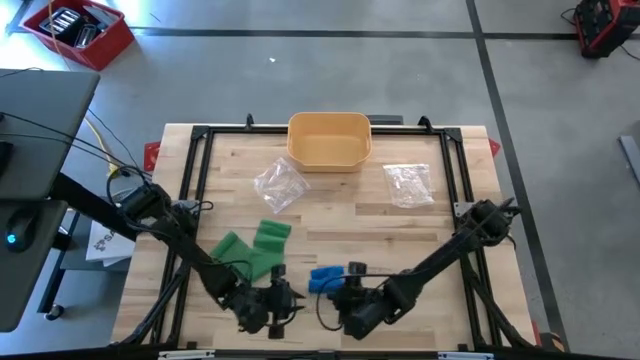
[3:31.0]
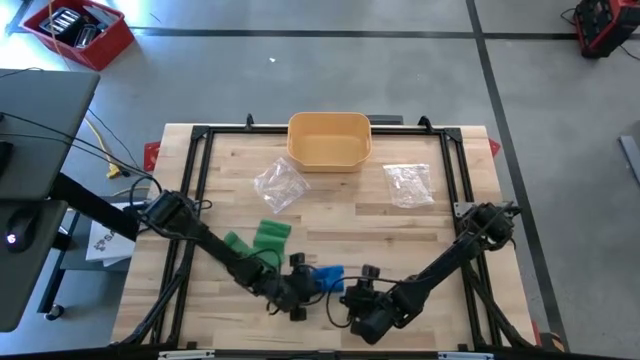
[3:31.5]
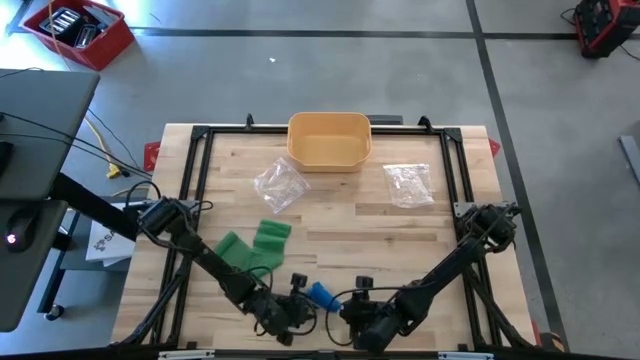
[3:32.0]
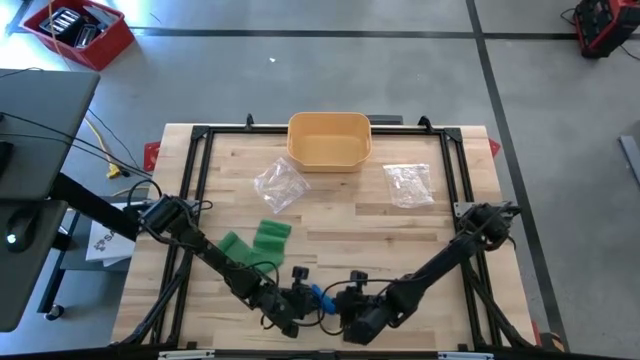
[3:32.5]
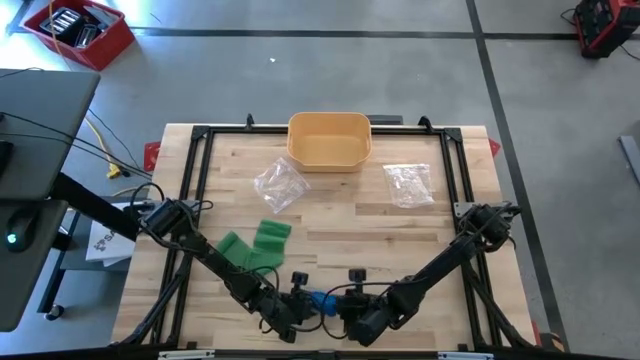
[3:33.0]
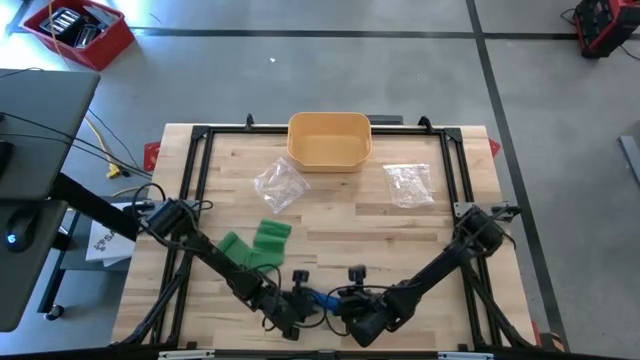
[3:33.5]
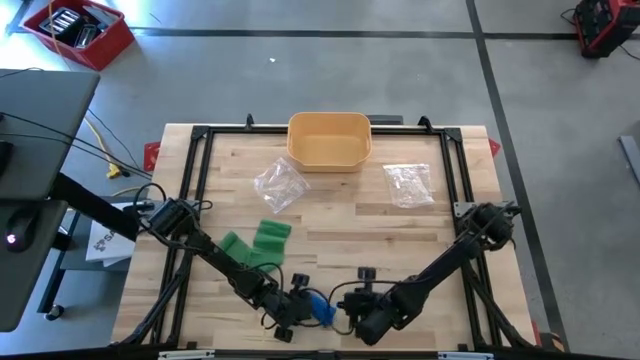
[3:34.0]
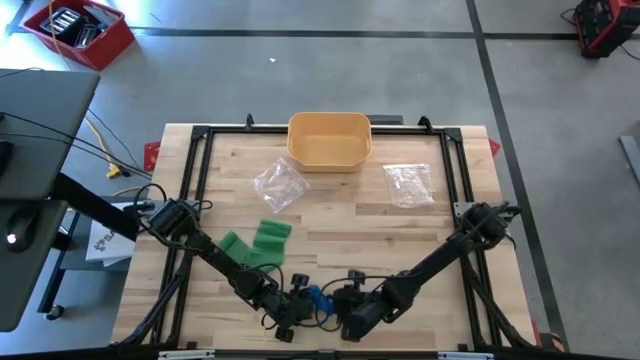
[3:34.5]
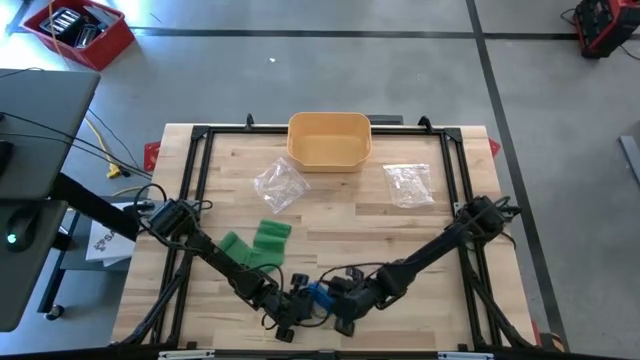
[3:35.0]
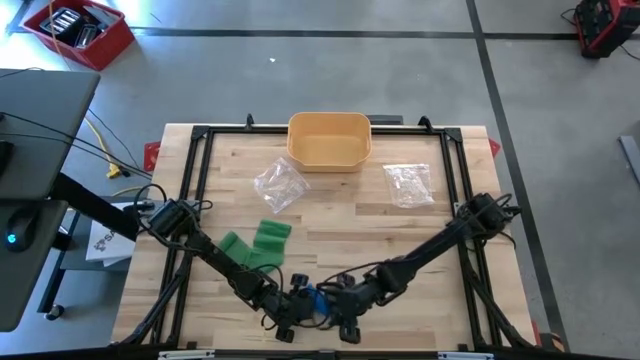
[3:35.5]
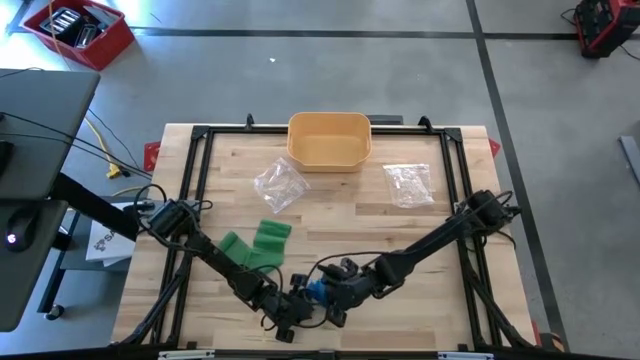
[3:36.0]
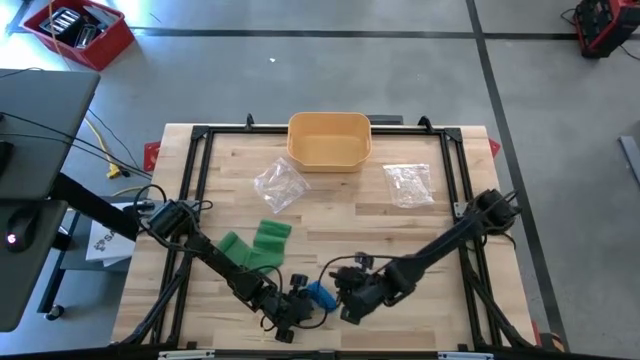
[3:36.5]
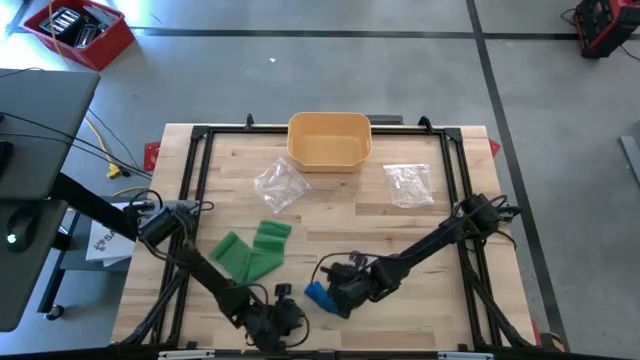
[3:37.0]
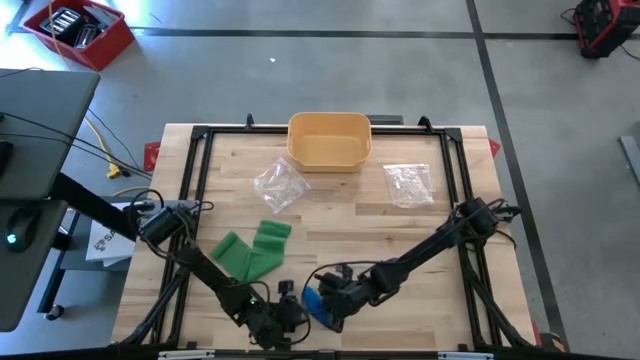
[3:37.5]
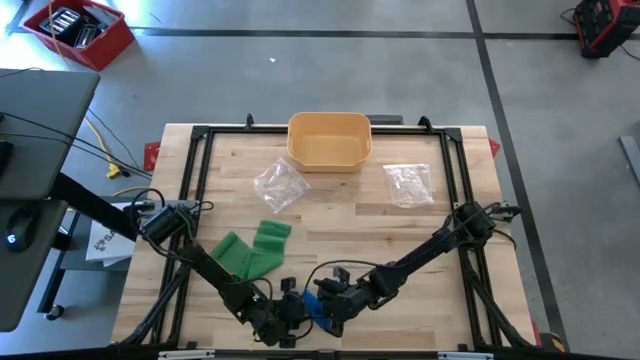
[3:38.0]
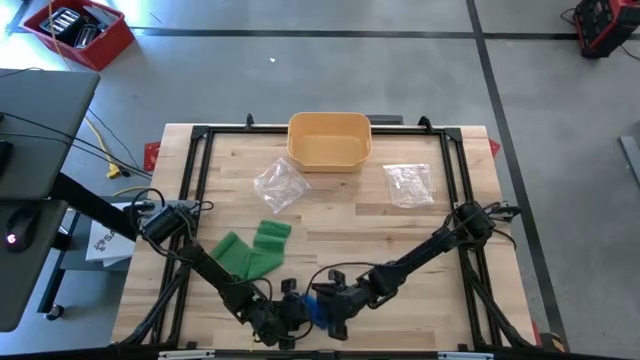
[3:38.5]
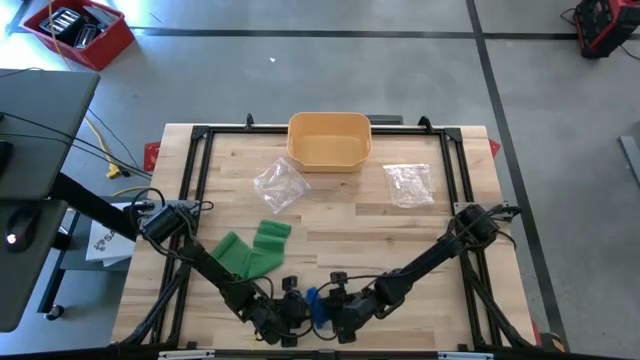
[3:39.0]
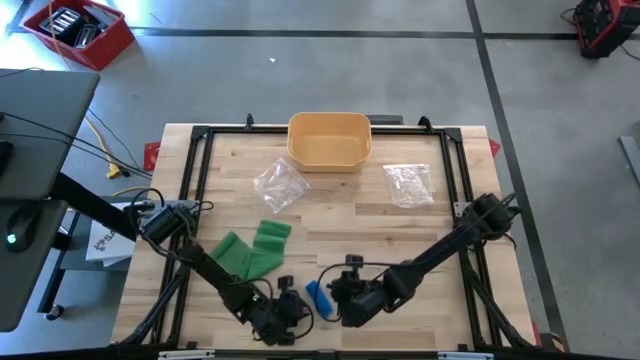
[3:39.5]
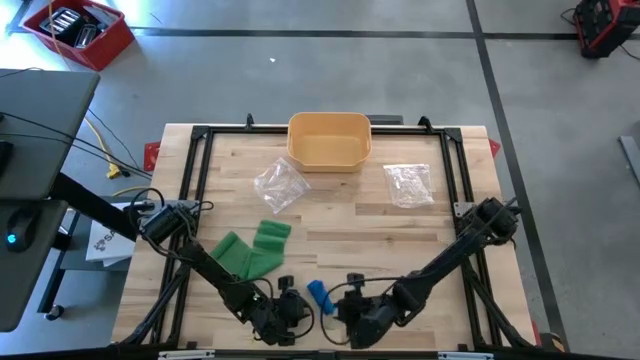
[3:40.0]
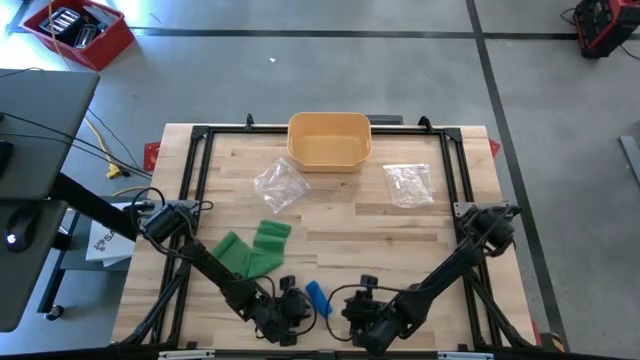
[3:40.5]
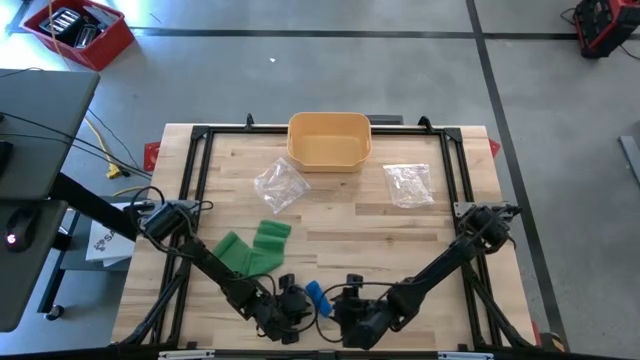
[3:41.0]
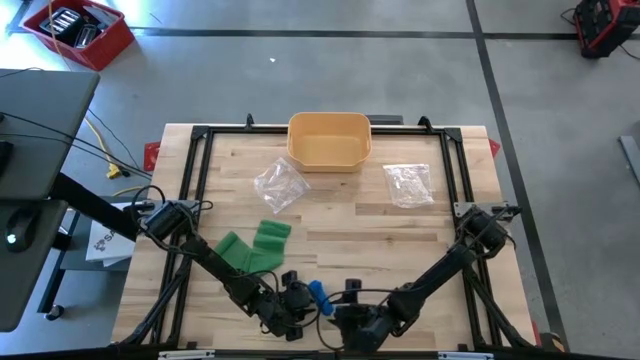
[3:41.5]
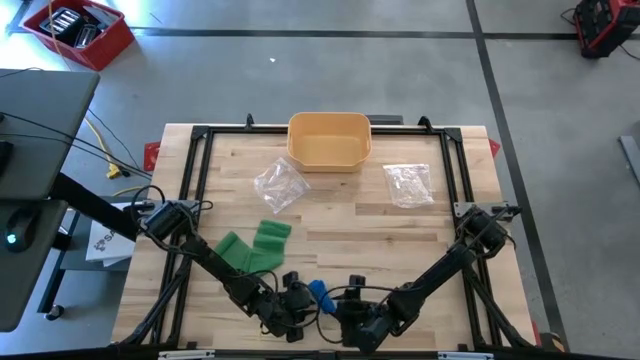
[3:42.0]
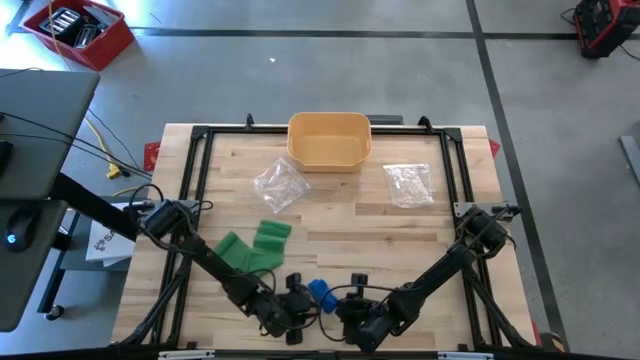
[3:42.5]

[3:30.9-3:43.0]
Task: Roll bandage
Roll the blue bandage

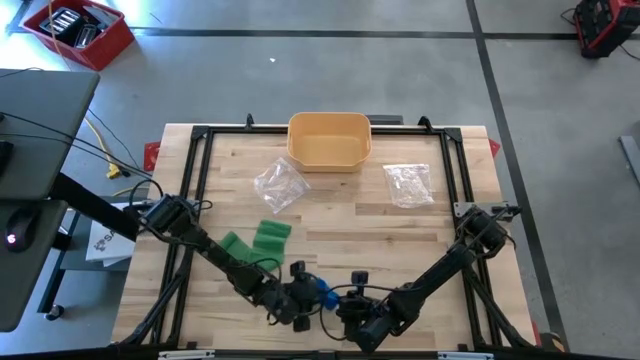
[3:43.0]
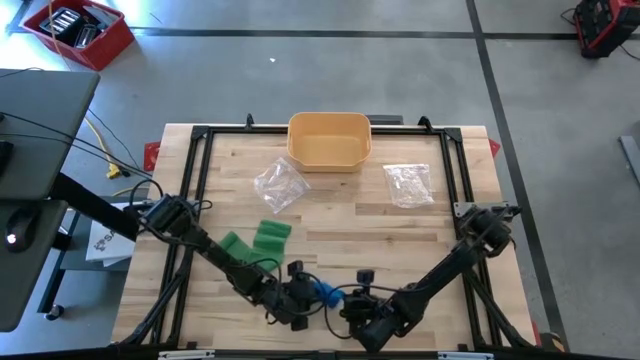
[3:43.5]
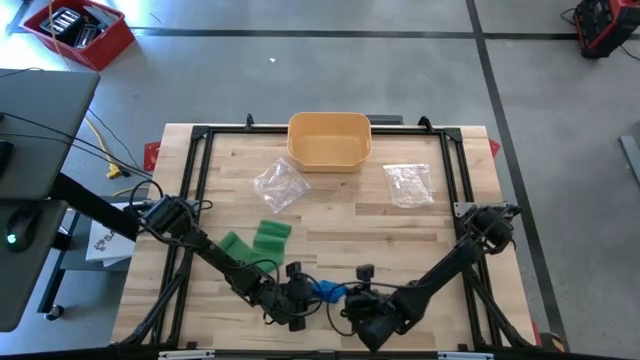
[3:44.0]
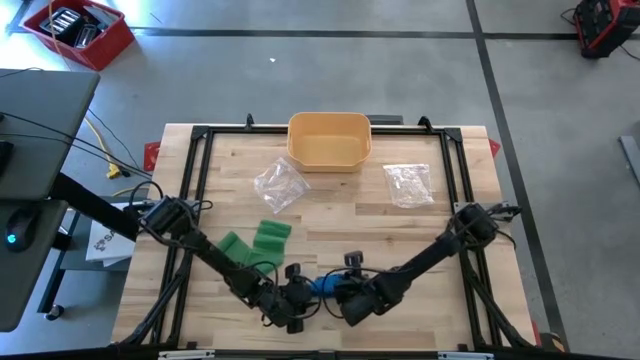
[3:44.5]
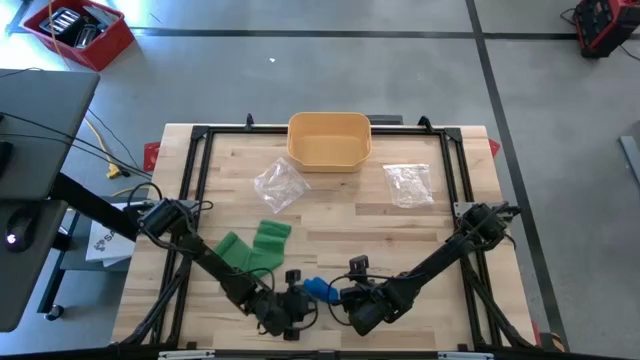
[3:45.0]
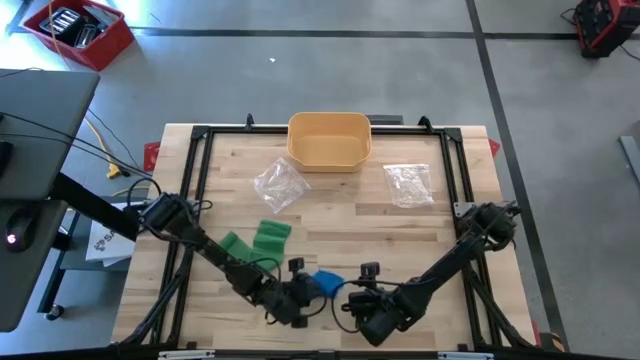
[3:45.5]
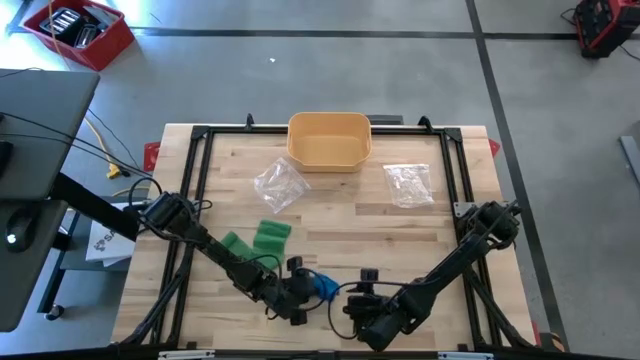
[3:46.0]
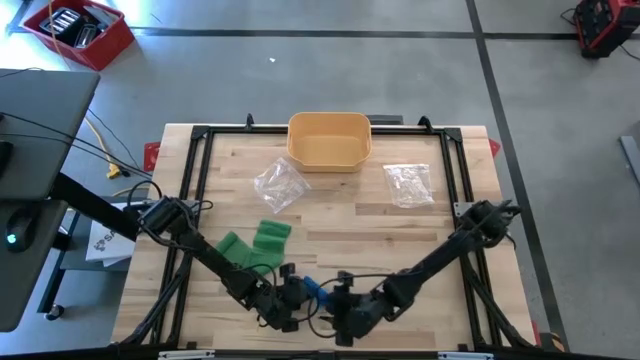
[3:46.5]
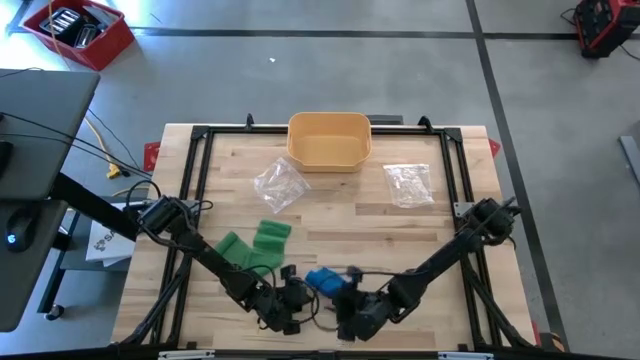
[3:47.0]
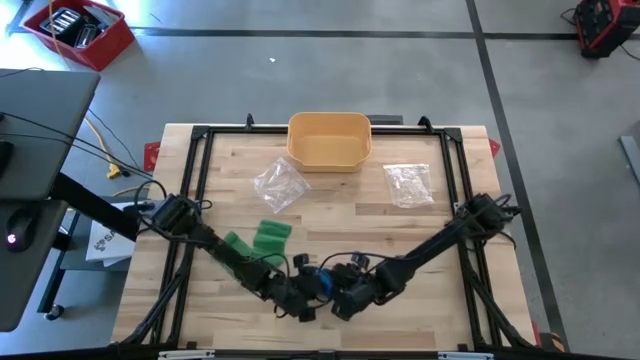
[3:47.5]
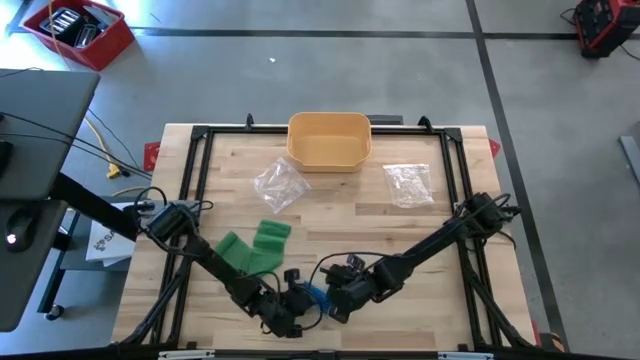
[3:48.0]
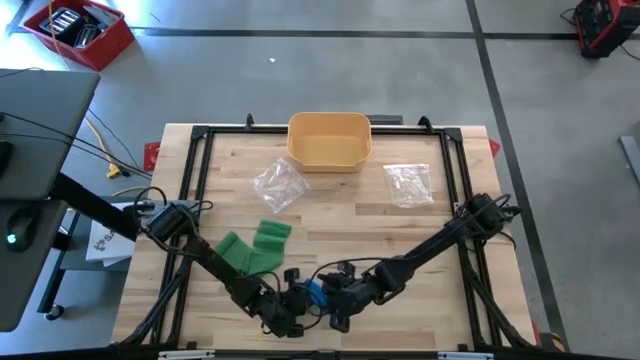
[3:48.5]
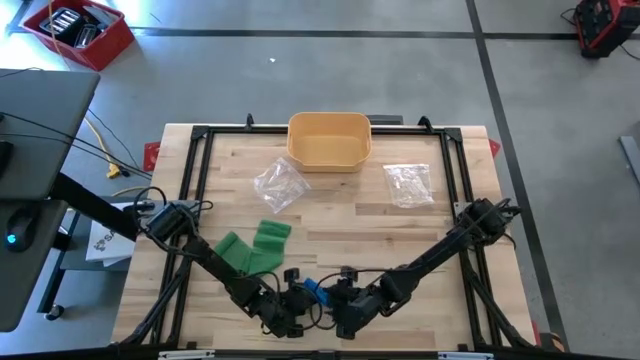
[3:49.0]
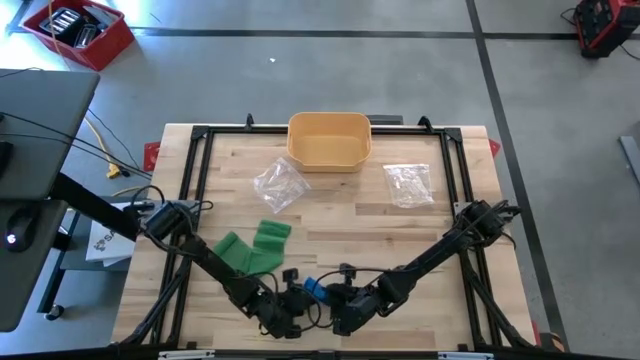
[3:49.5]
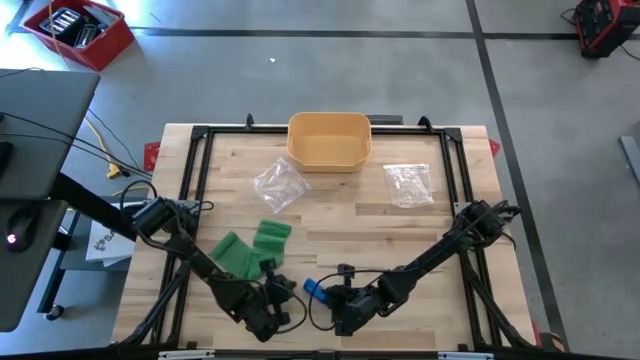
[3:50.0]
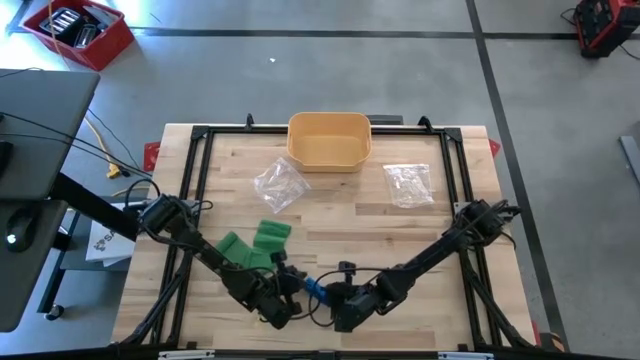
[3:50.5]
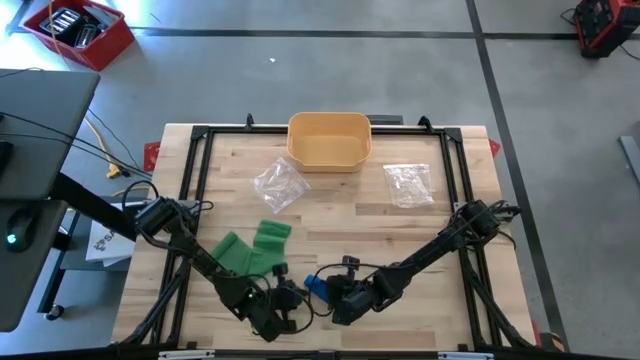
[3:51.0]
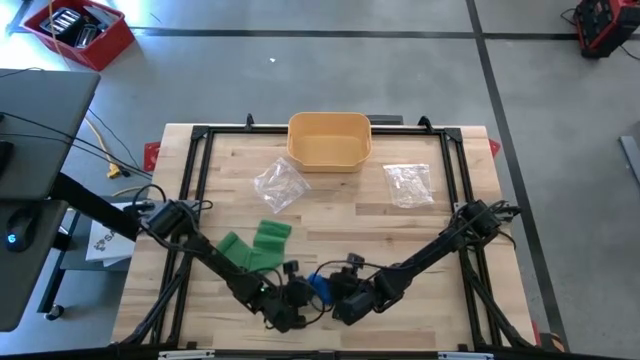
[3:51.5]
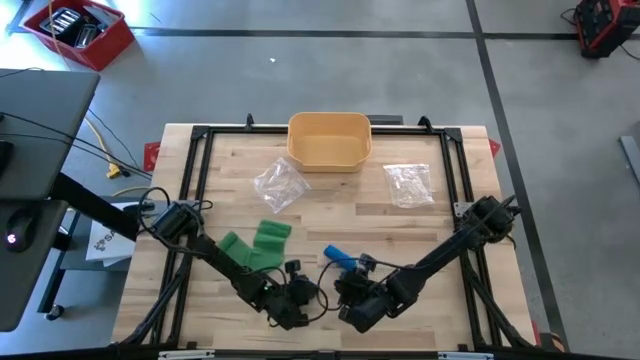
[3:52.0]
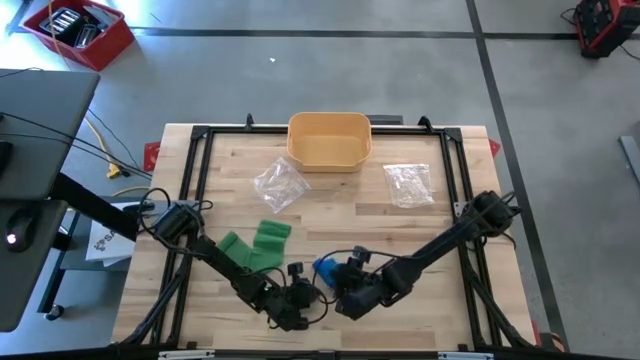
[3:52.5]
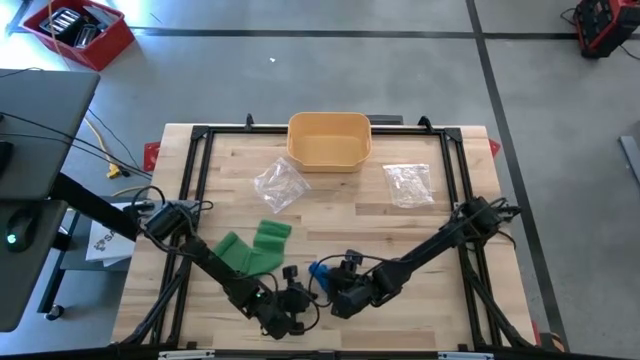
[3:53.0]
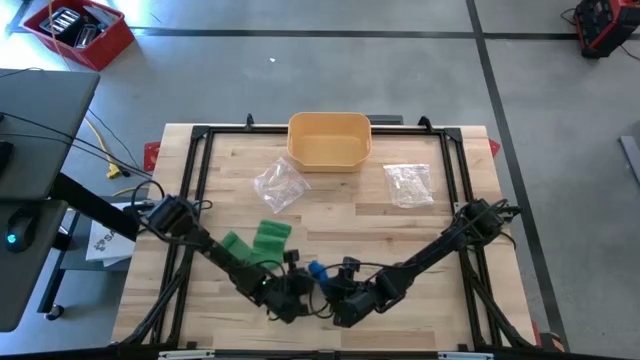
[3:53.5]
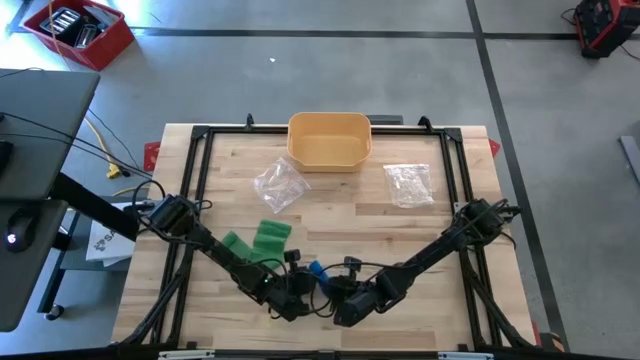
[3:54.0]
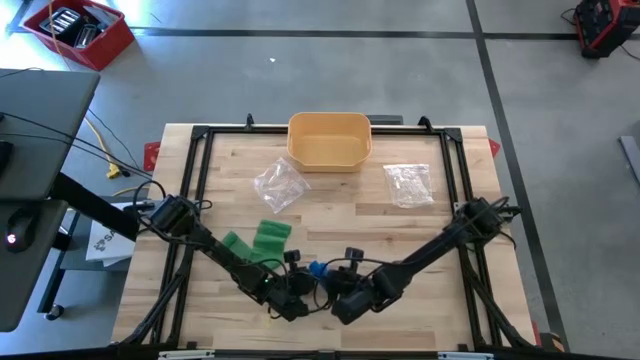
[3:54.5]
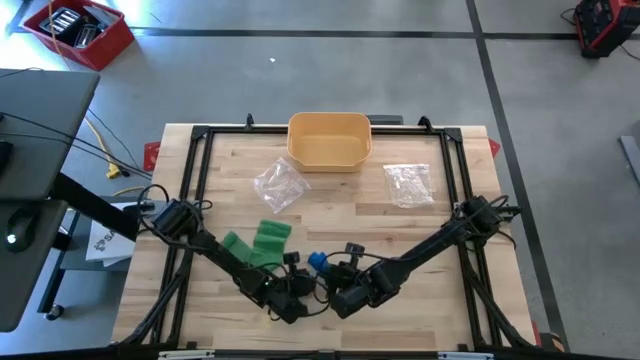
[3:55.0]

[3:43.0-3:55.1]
Roll the blue bandage
